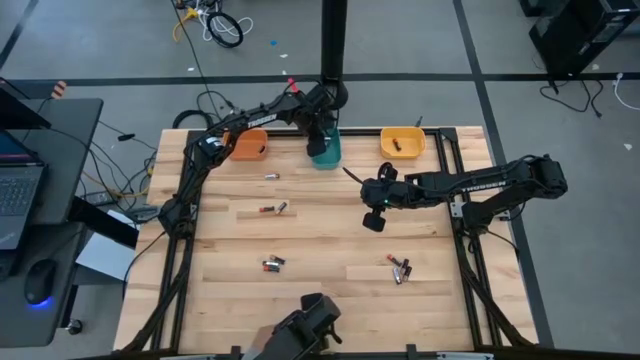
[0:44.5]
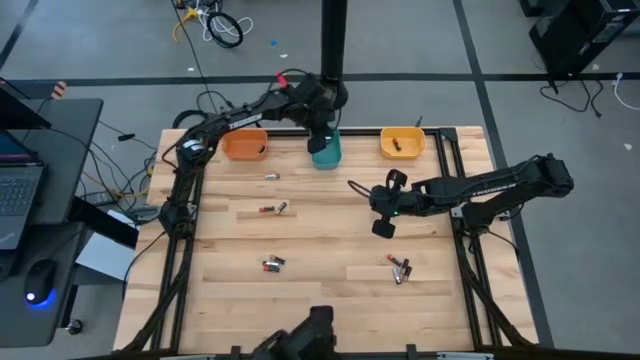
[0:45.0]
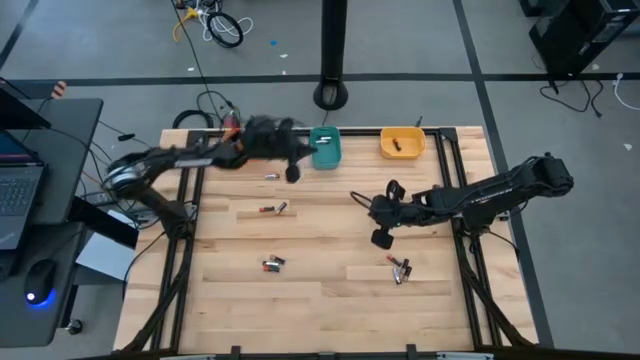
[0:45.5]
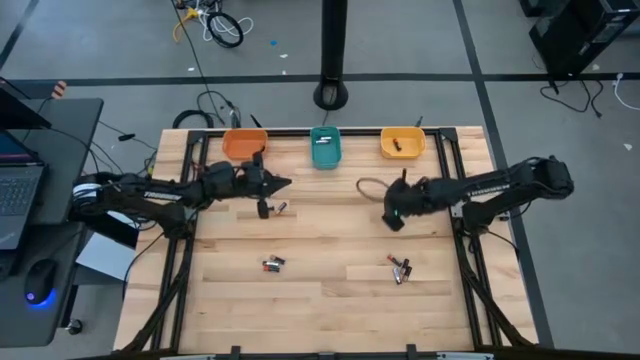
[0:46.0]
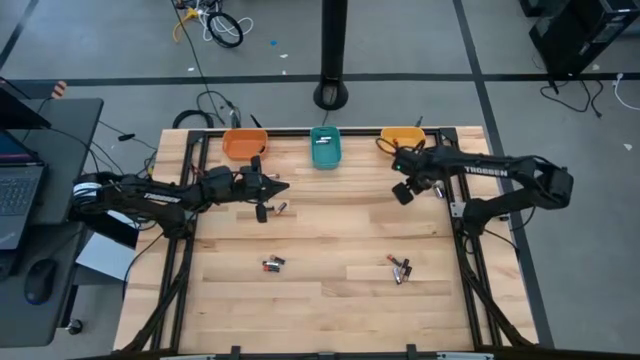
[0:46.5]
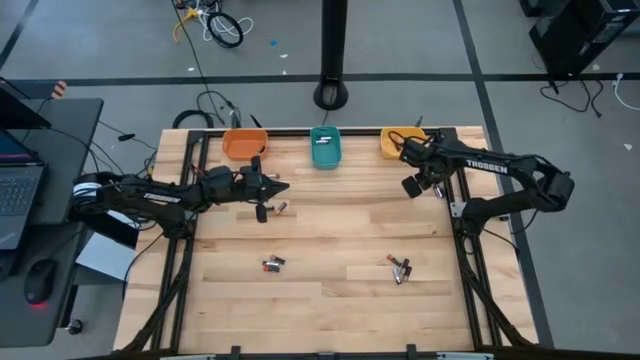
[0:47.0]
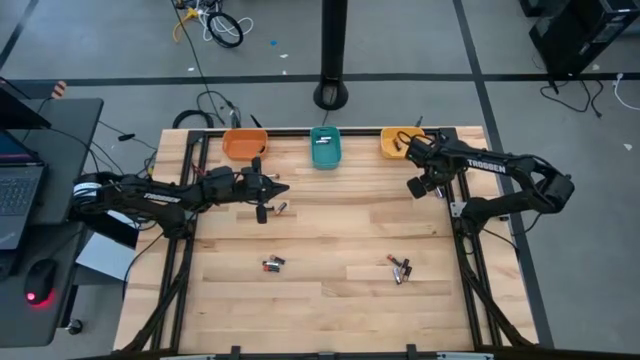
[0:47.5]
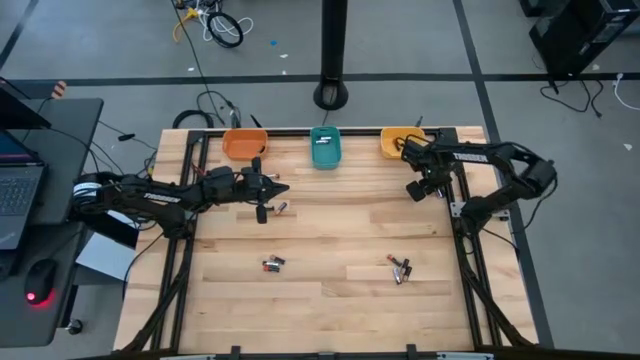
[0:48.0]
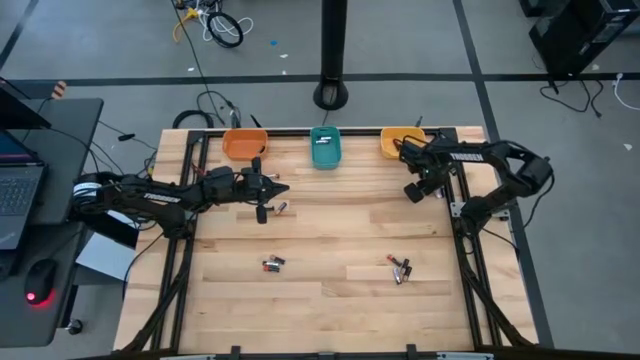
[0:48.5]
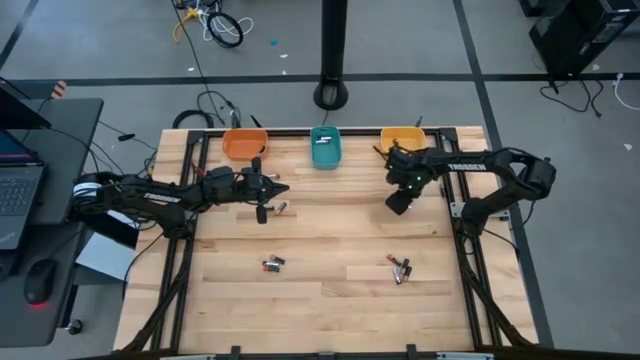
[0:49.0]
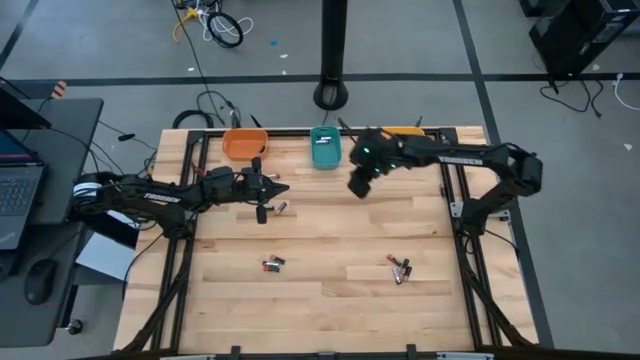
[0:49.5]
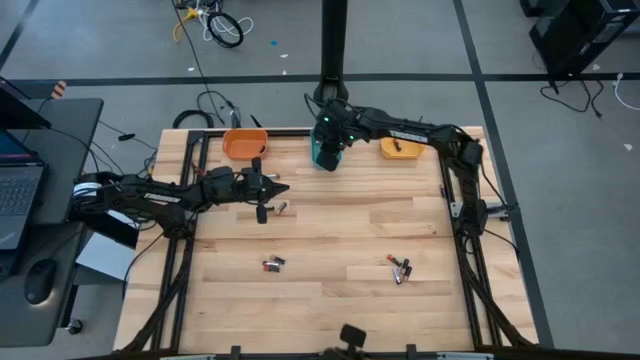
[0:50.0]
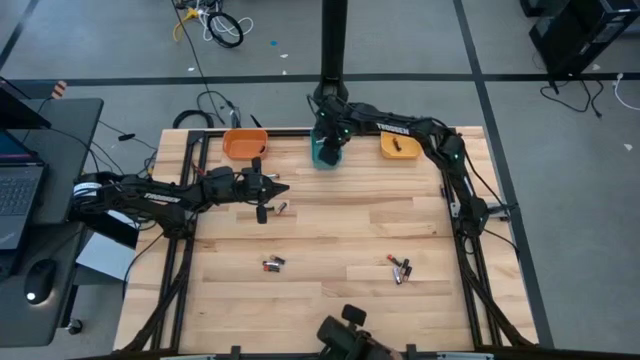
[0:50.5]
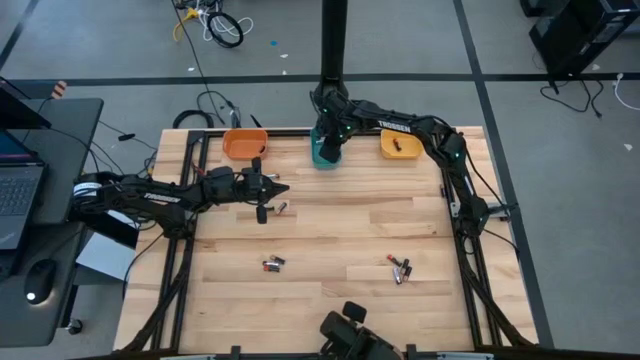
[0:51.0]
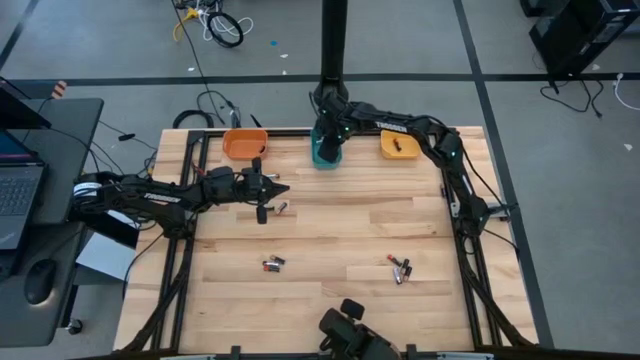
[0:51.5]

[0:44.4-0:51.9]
Task: Sort batteries
Put the black-silver battery in the green bin

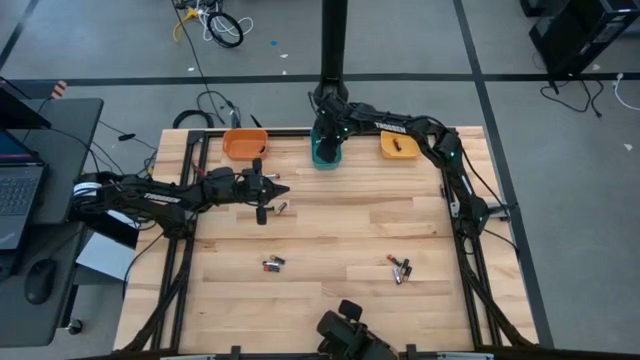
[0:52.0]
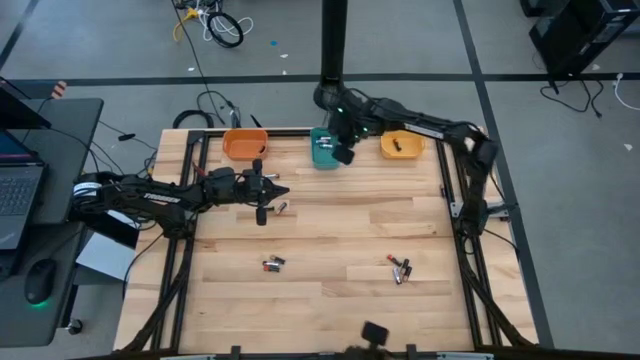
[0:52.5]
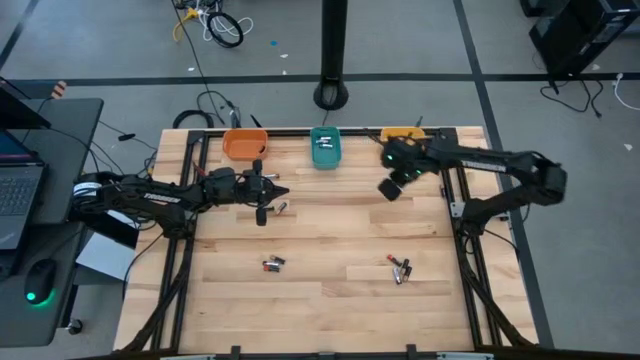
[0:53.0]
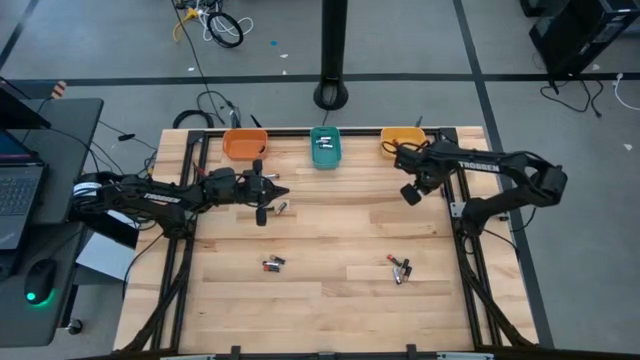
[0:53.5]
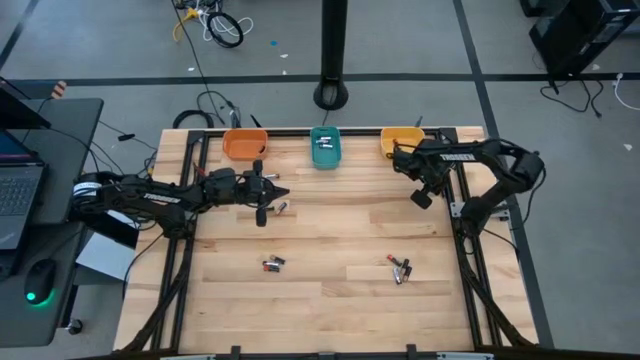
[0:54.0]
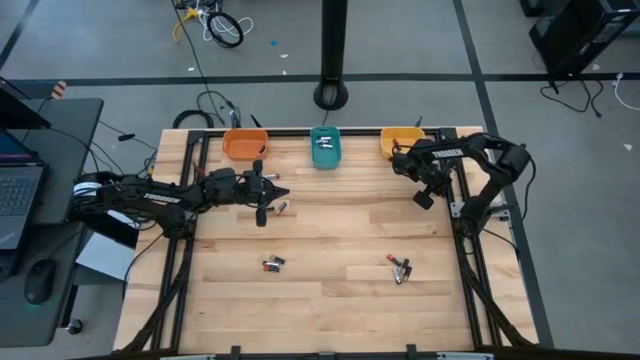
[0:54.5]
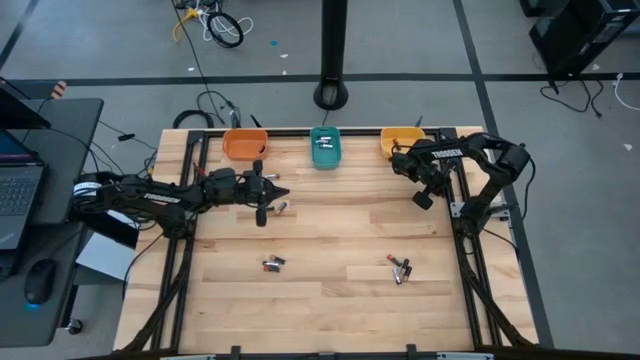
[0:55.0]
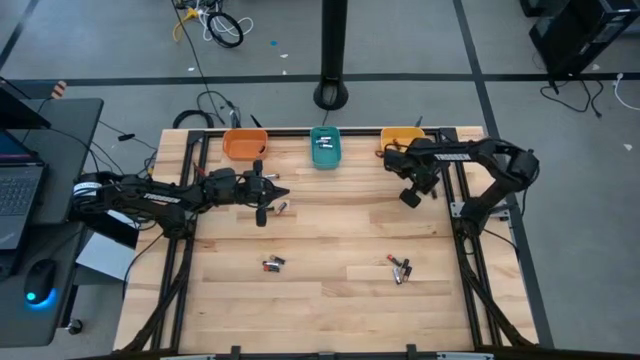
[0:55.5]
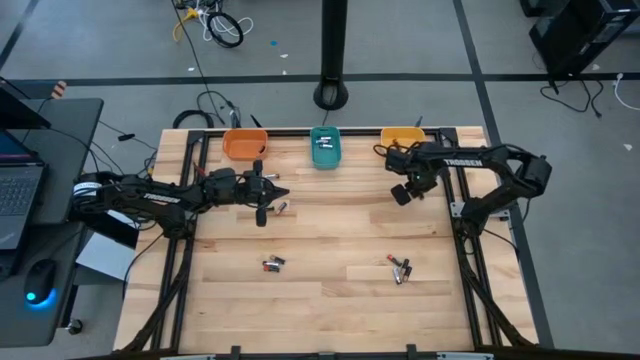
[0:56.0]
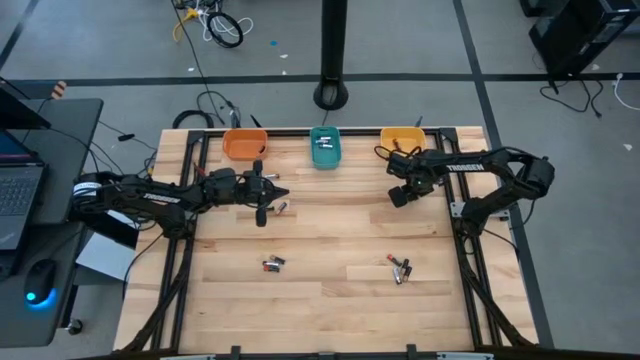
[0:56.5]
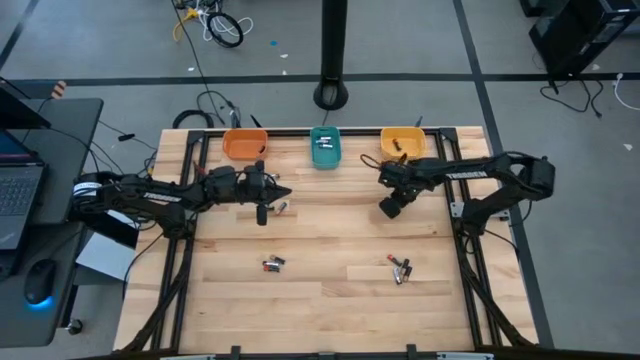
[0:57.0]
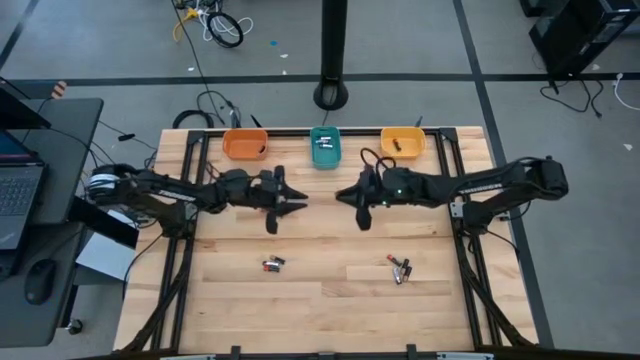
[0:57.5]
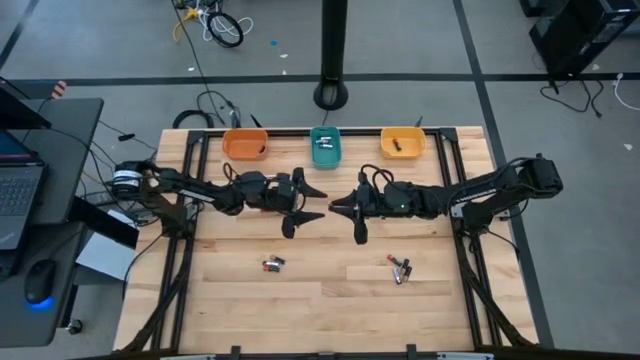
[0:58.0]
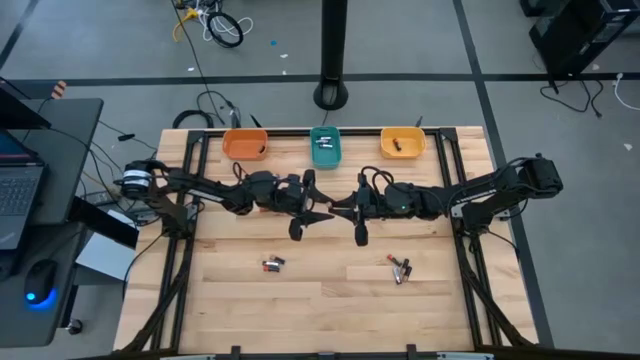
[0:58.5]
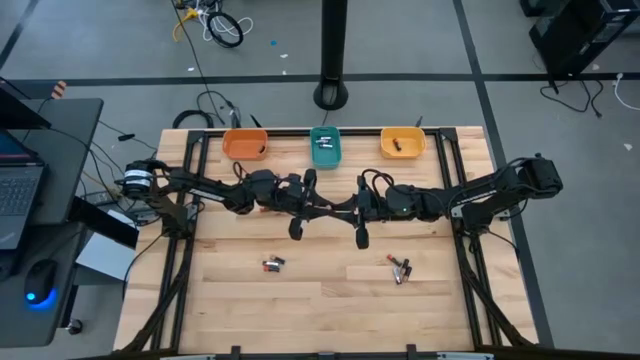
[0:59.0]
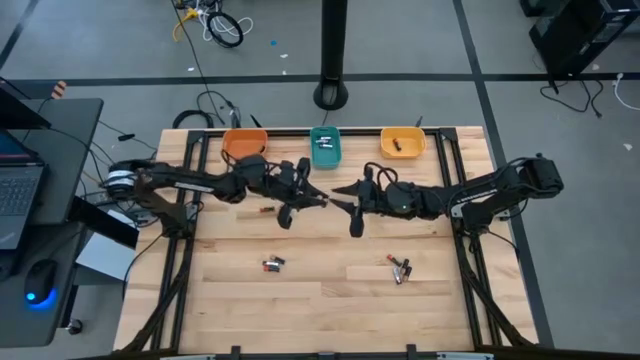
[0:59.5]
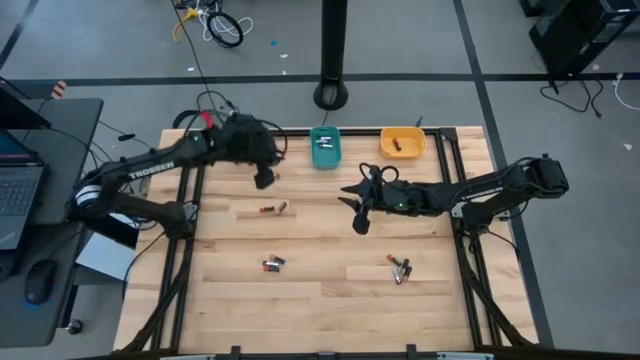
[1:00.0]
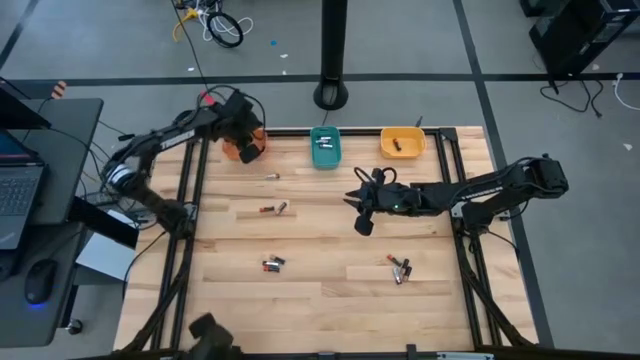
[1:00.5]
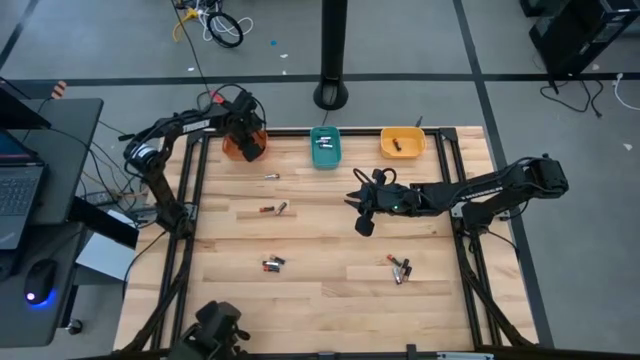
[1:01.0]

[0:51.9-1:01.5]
Put the brown-black battery in the orange bin

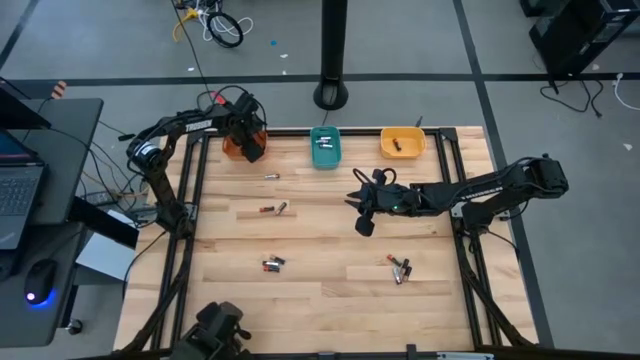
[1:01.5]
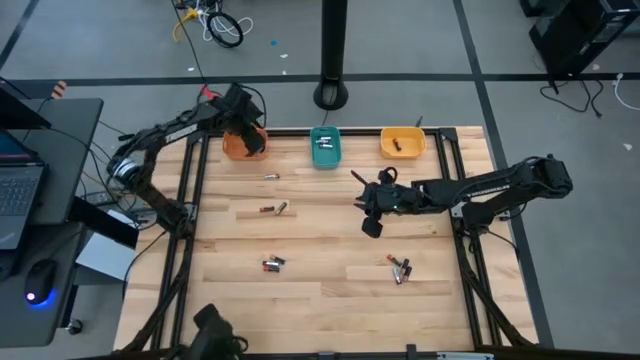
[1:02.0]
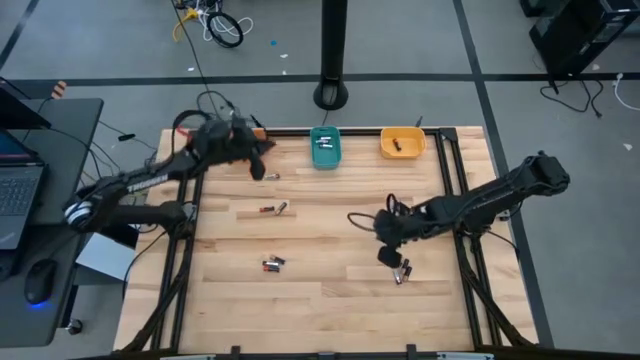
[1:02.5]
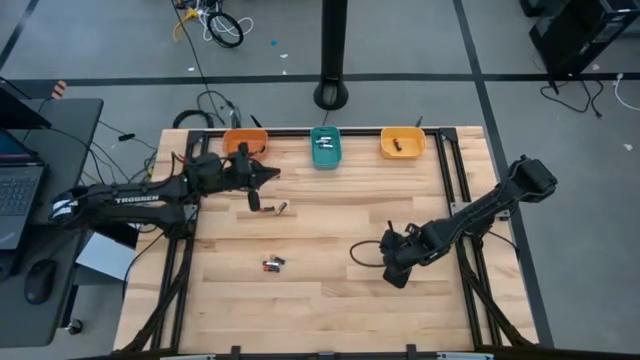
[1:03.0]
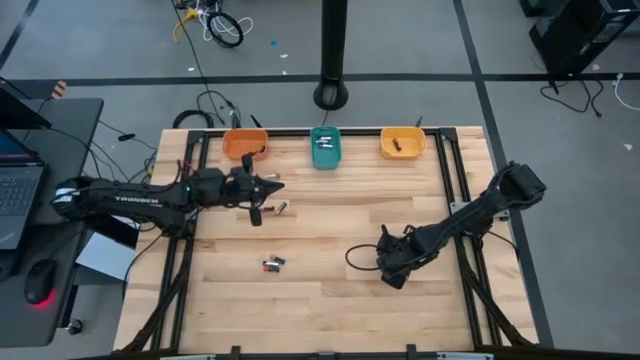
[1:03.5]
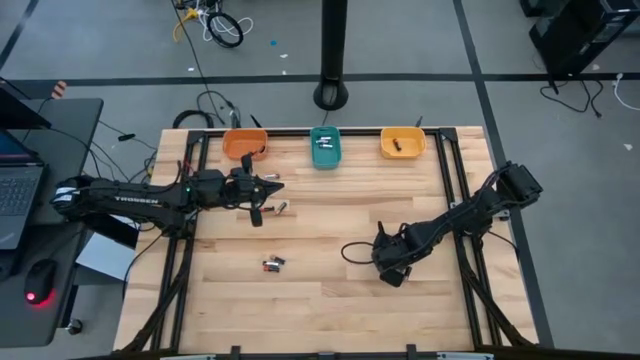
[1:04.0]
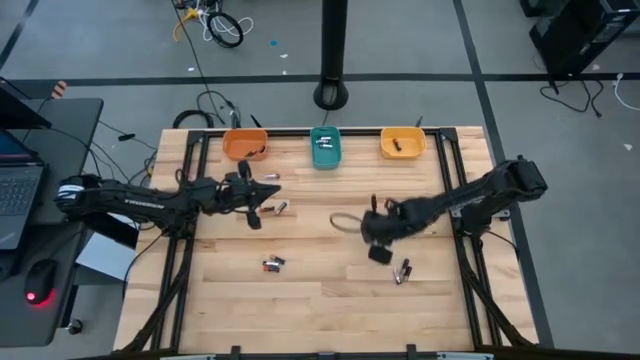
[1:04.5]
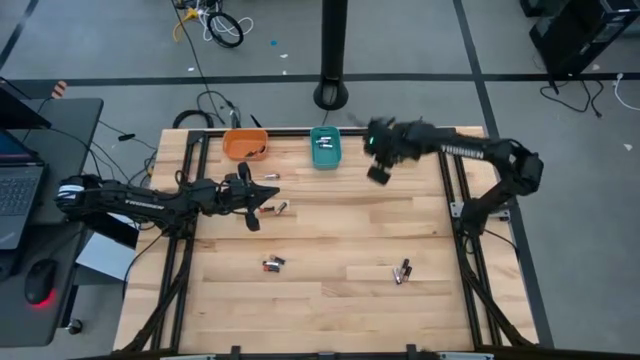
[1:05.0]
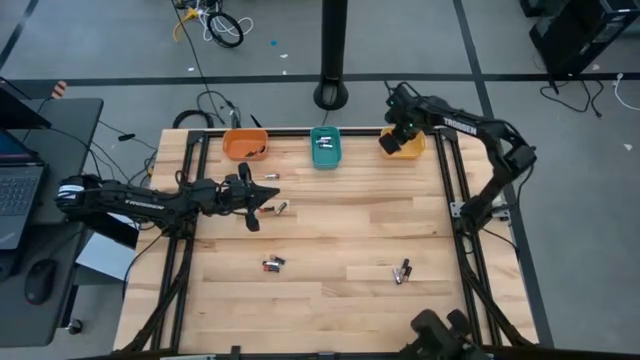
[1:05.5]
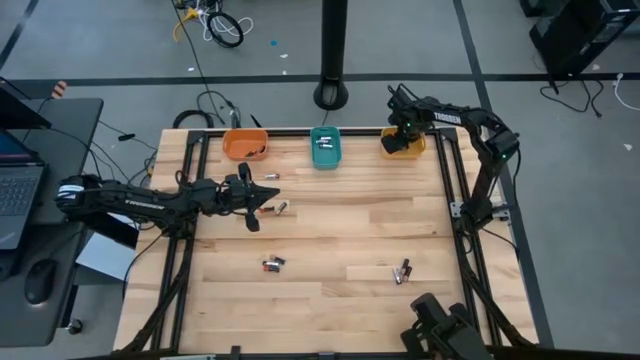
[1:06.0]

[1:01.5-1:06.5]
Put the red-black battery in the yellow bin
